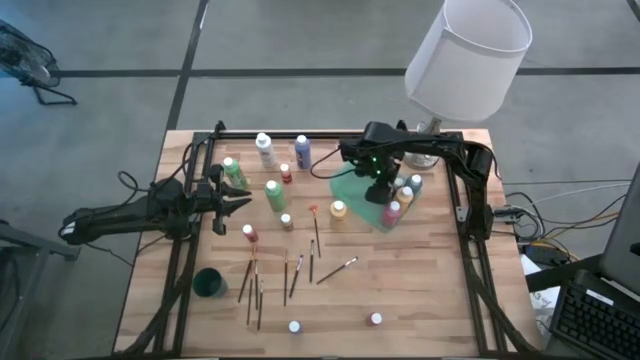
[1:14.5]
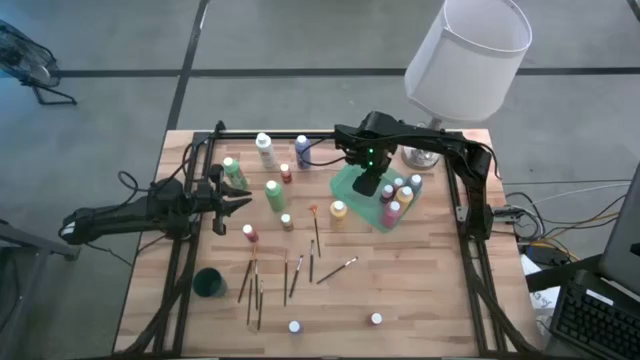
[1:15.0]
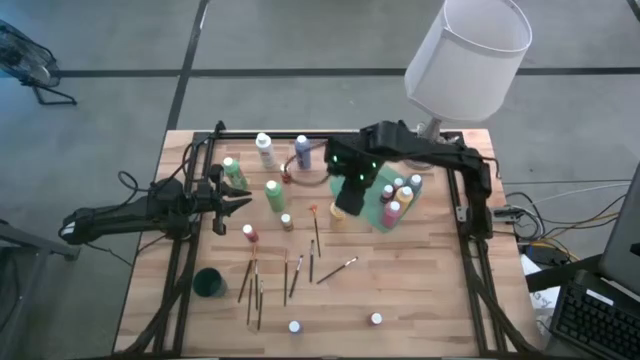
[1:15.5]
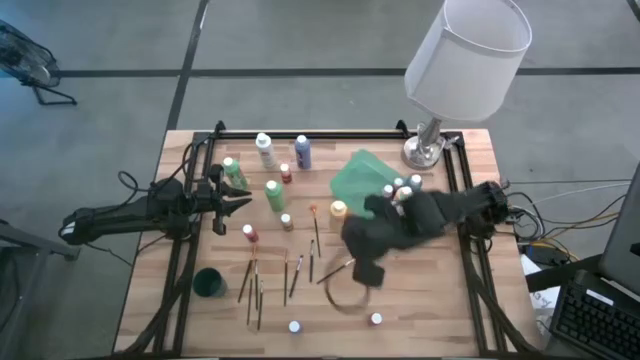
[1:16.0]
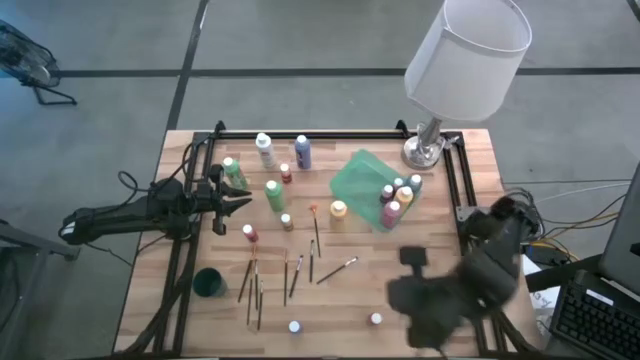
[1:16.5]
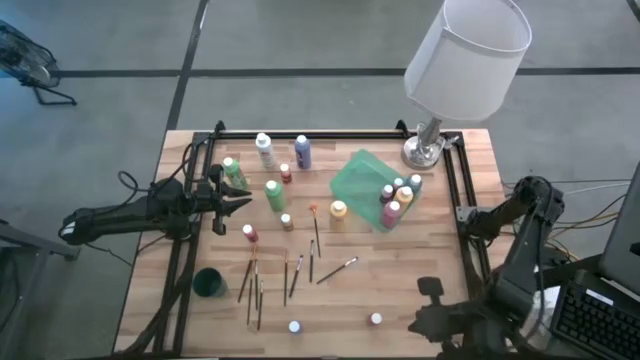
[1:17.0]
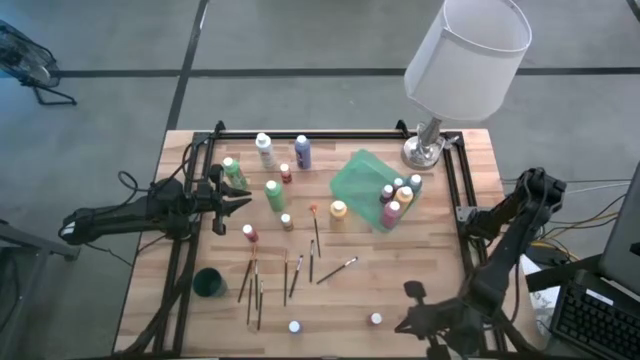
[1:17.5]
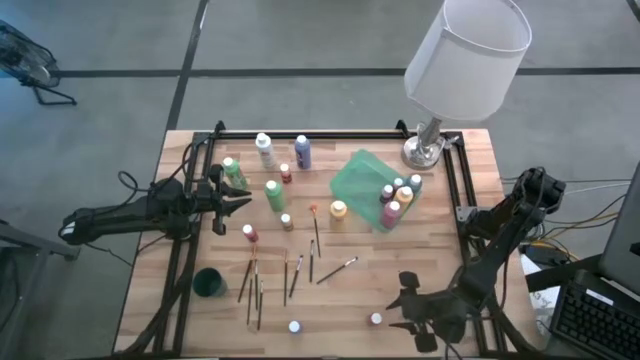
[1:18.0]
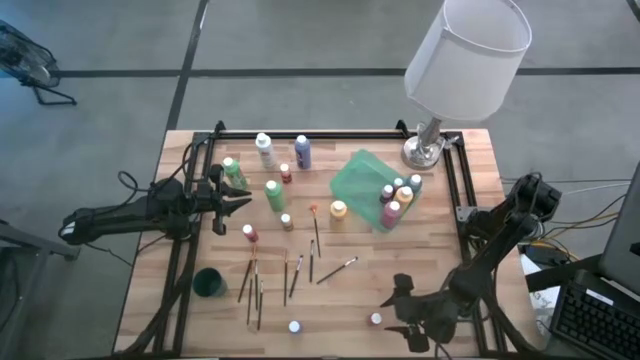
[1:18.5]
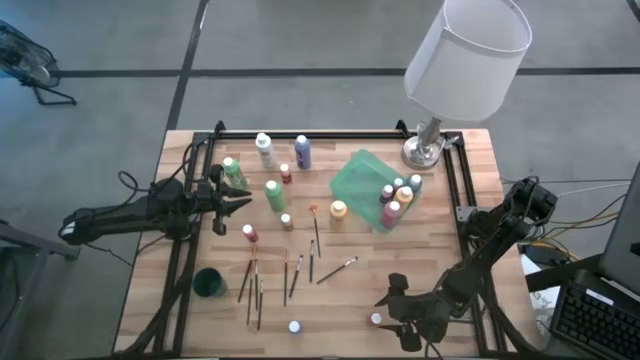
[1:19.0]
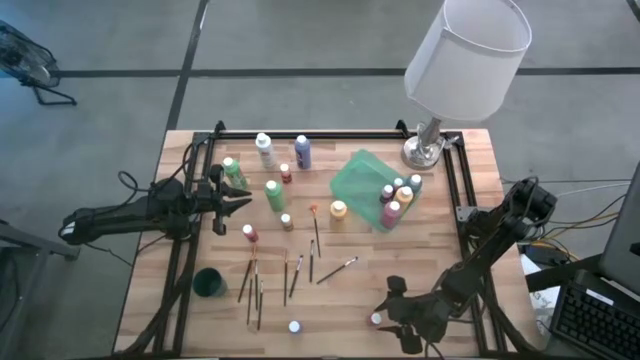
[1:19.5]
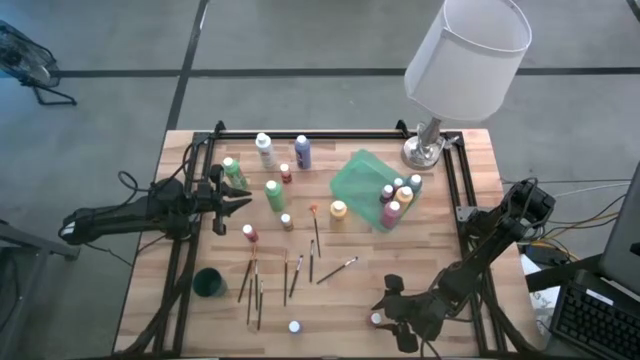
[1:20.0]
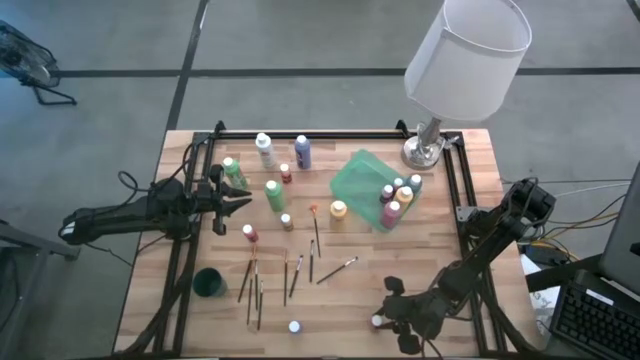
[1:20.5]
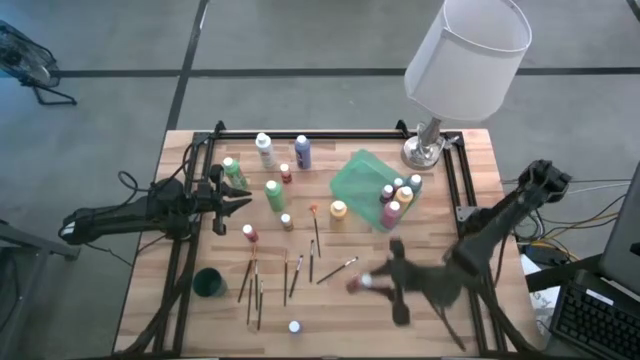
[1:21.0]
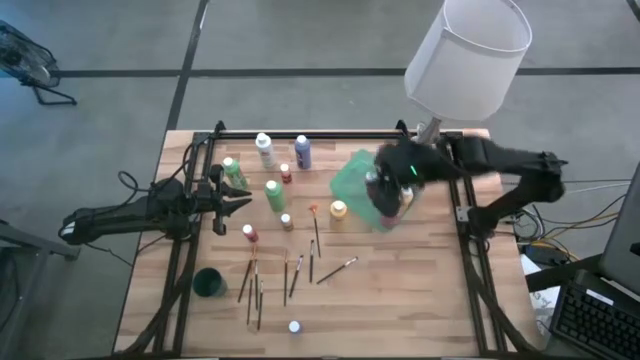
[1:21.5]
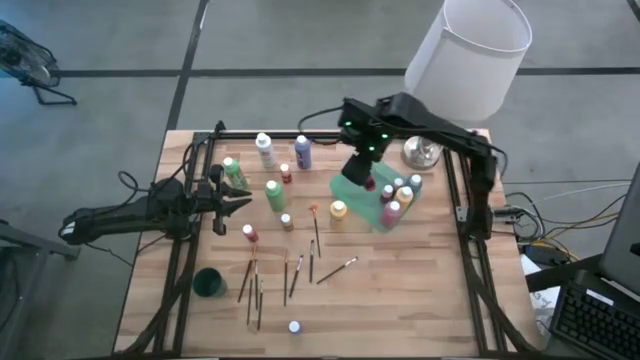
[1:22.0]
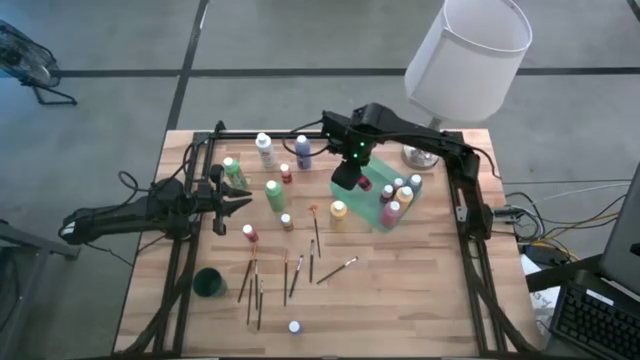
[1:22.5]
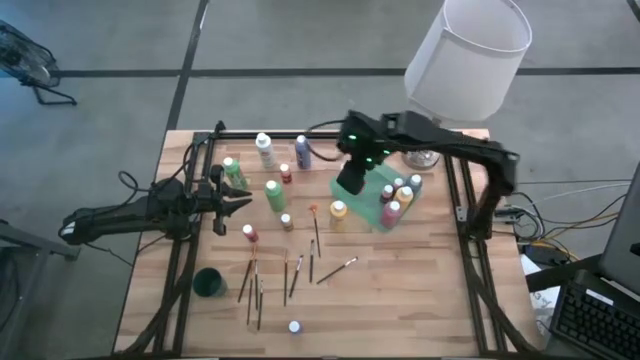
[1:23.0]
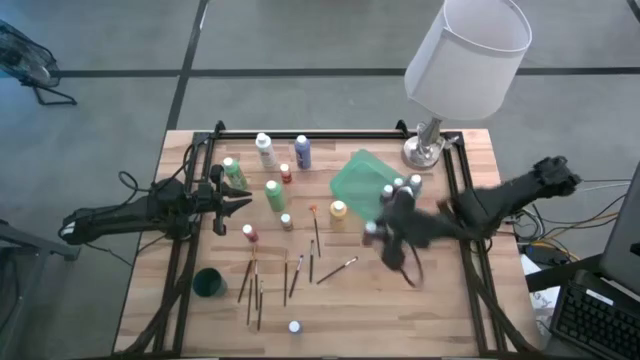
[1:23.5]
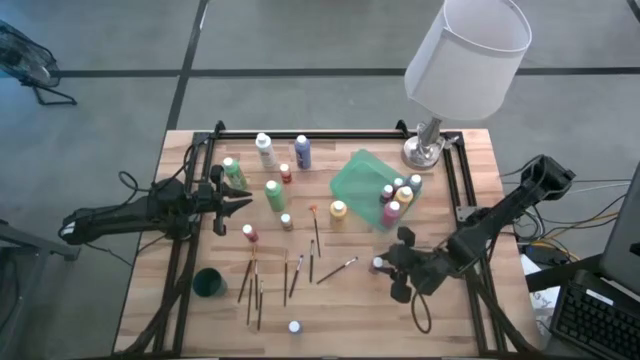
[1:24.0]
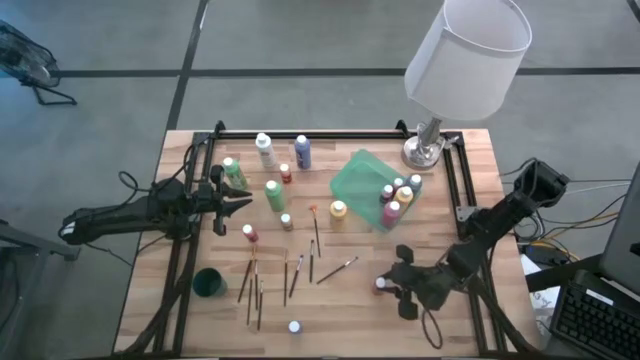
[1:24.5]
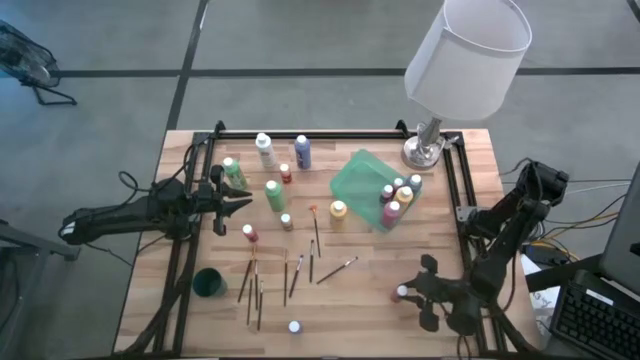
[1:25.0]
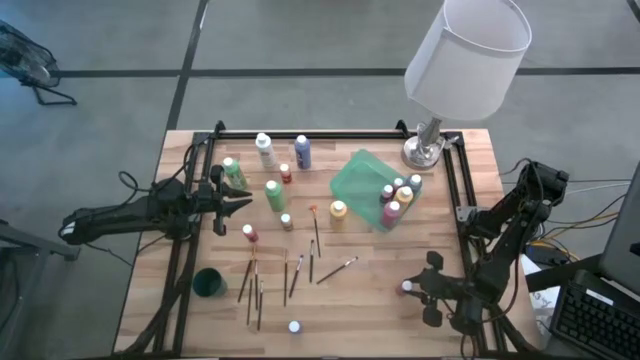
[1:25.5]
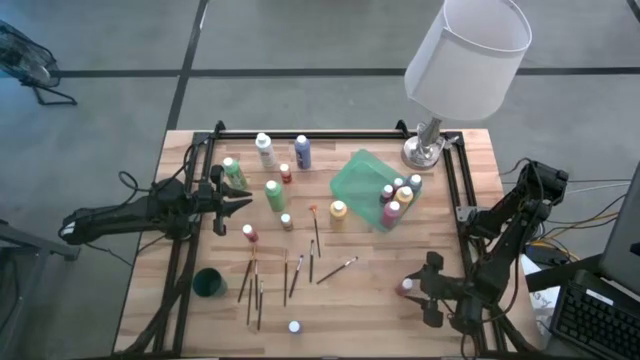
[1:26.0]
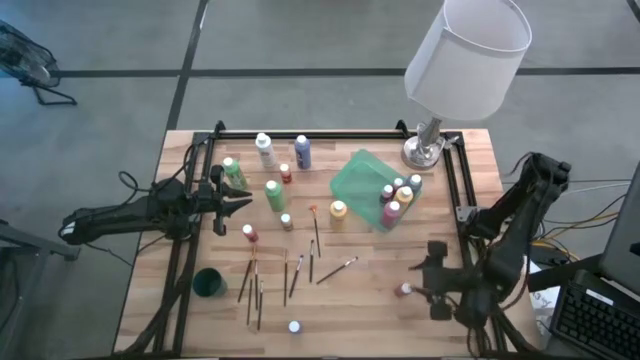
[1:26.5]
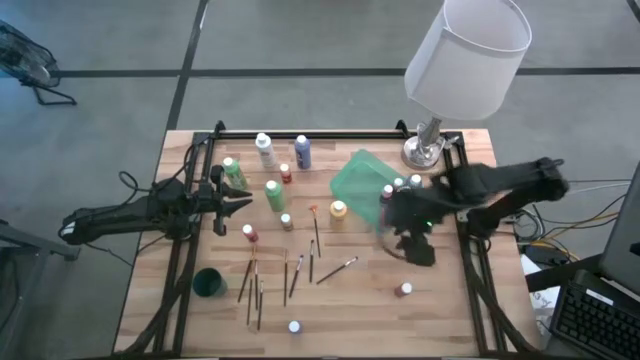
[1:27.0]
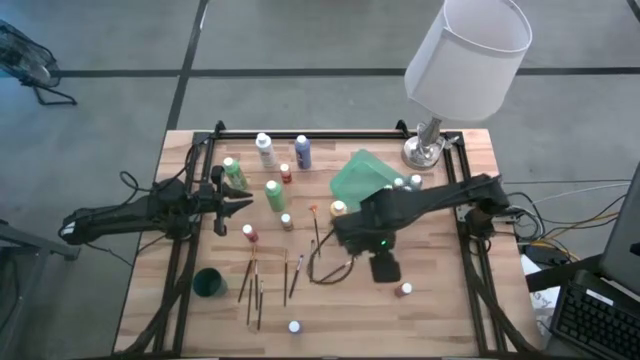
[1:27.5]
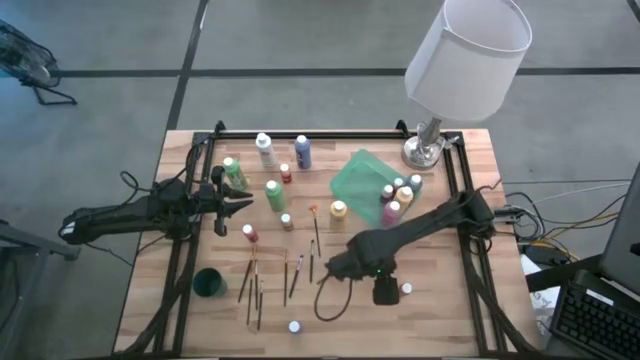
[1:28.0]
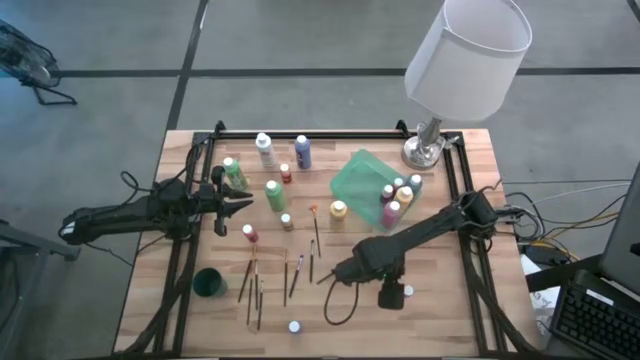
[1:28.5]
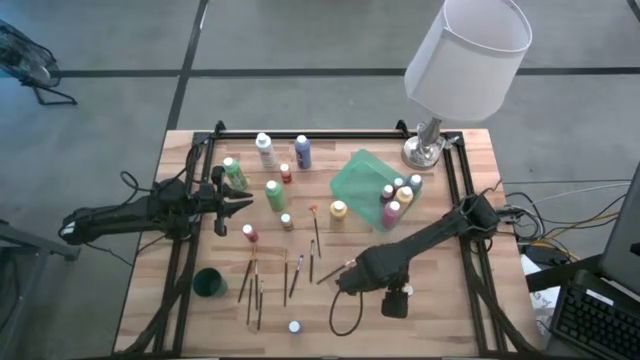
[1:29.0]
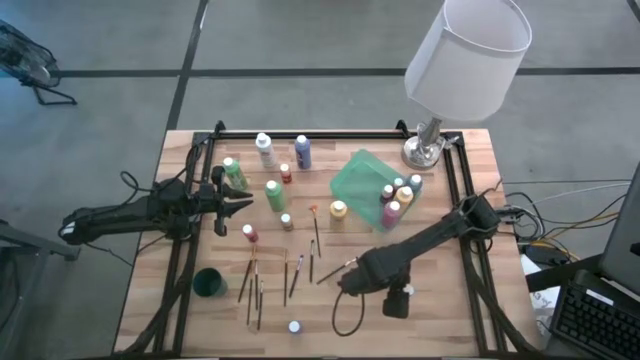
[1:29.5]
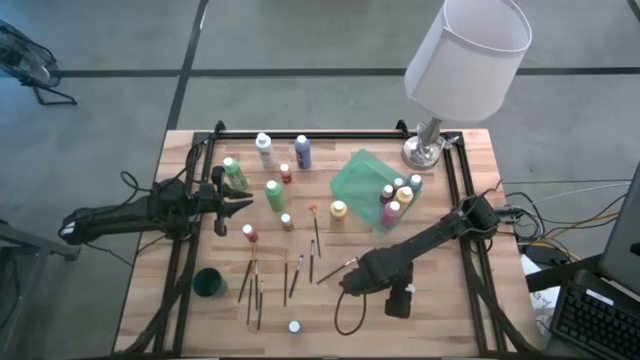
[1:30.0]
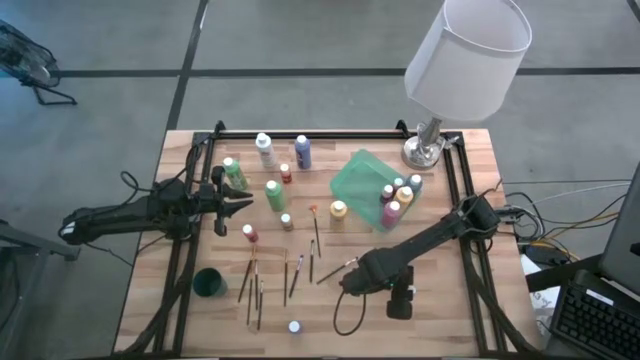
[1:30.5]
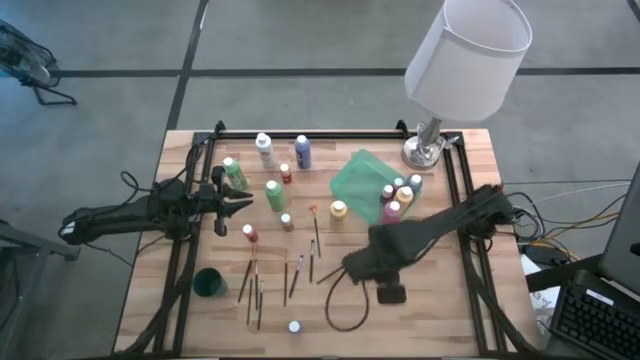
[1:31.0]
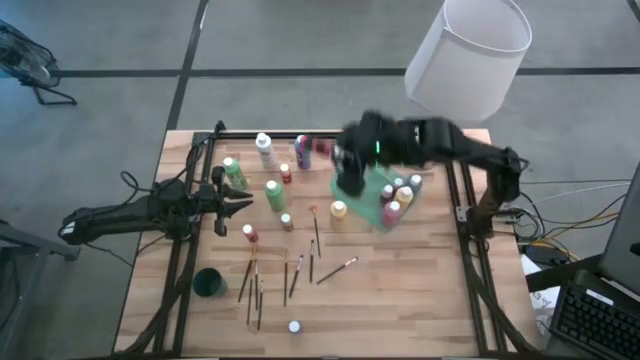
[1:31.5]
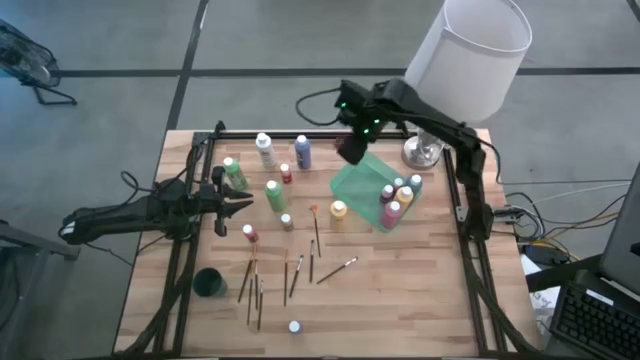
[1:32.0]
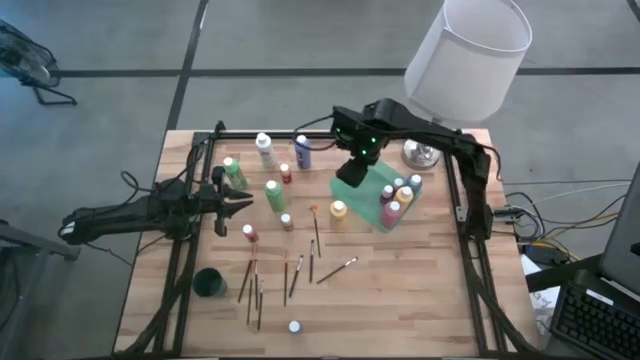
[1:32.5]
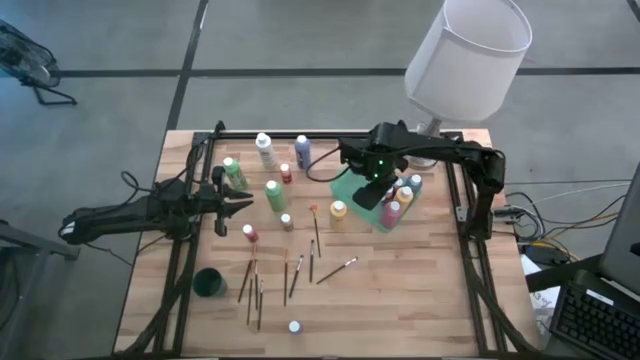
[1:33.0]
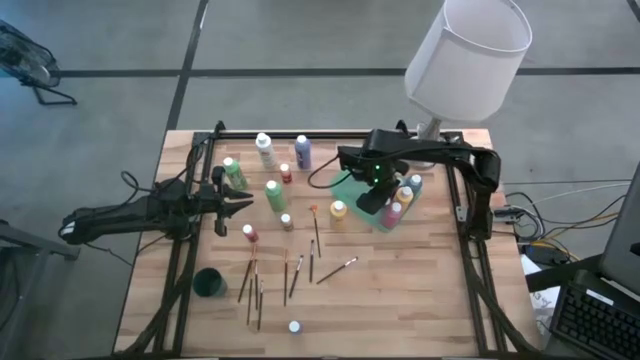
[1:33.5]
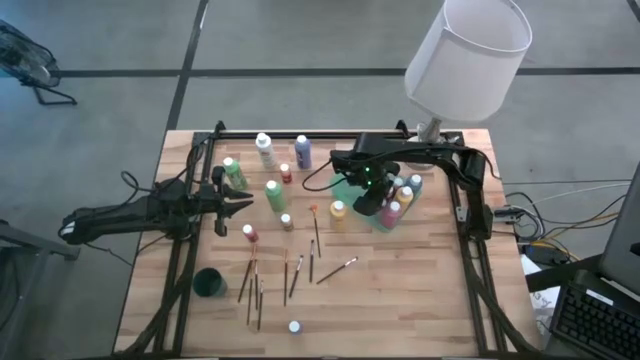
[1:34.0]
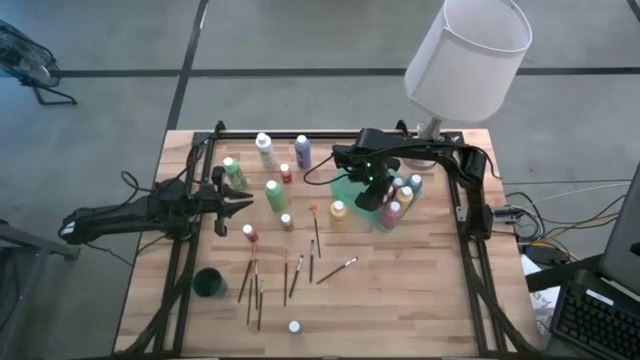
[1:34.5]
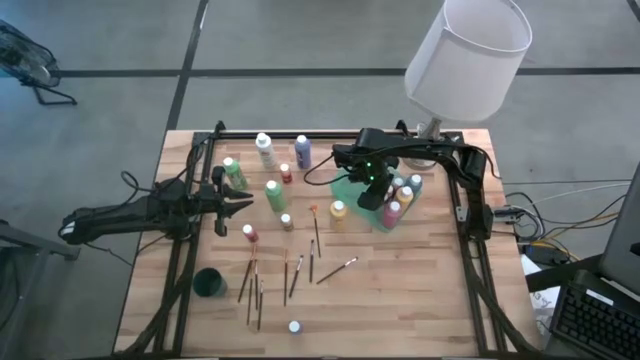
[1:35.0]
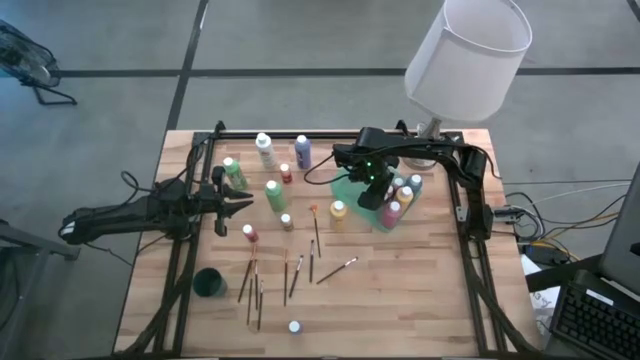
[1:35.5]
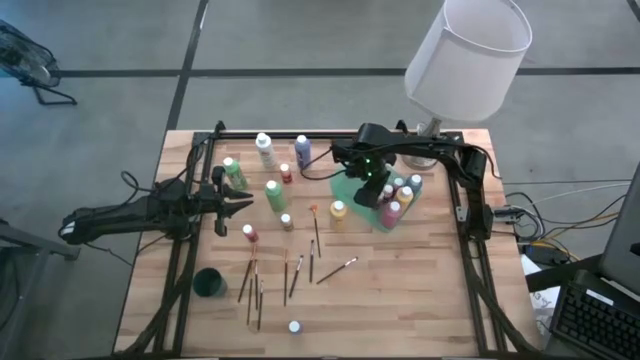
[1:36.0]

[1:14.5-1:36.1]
Task: Pick & Place Paint Supplies
Put the small red paint bottle into the green bin
